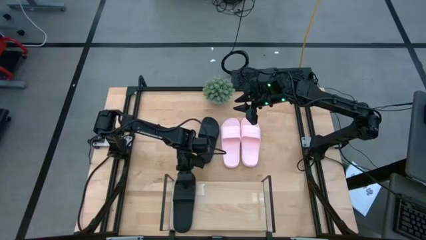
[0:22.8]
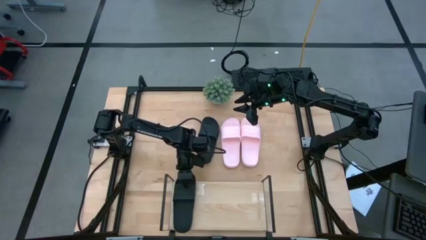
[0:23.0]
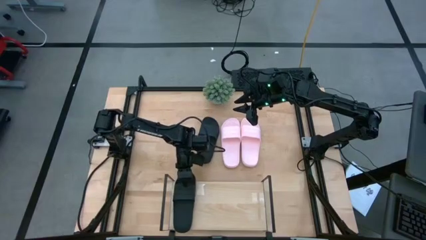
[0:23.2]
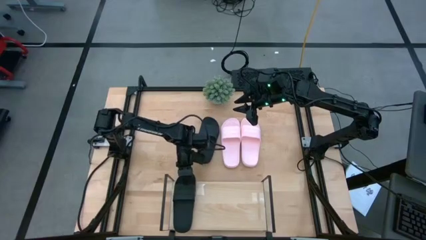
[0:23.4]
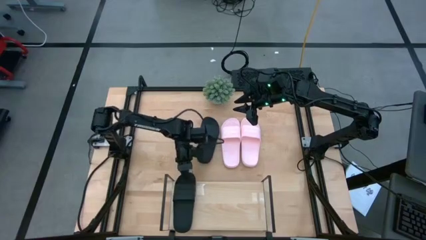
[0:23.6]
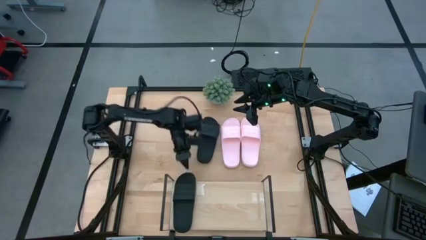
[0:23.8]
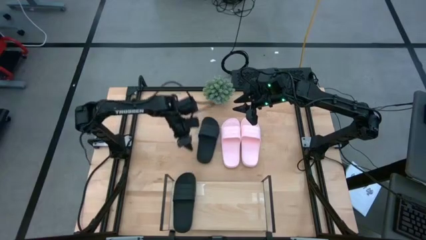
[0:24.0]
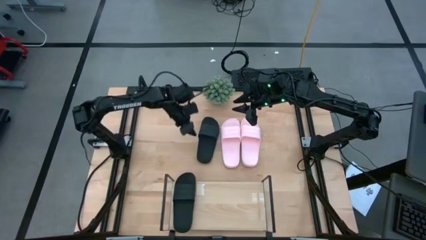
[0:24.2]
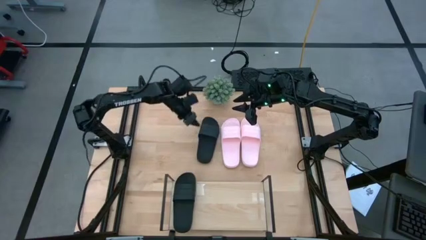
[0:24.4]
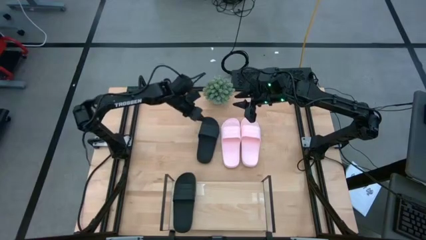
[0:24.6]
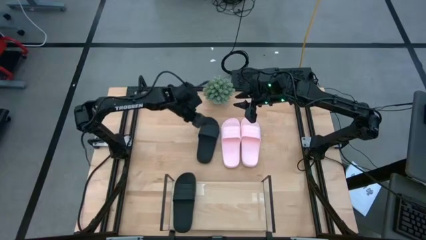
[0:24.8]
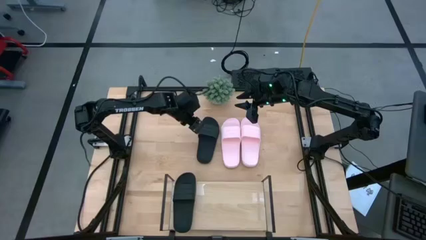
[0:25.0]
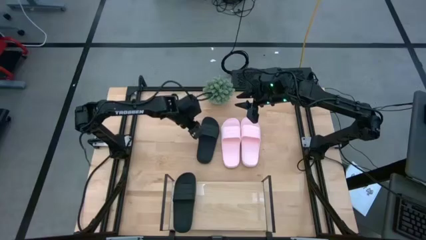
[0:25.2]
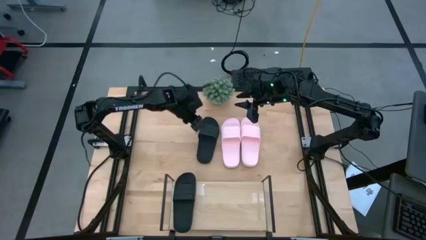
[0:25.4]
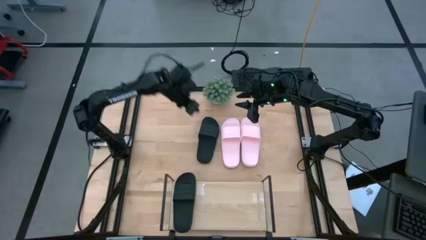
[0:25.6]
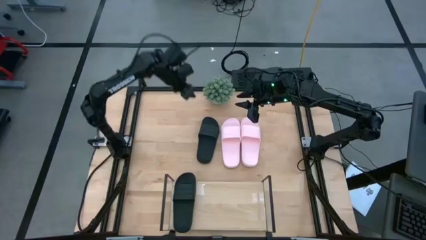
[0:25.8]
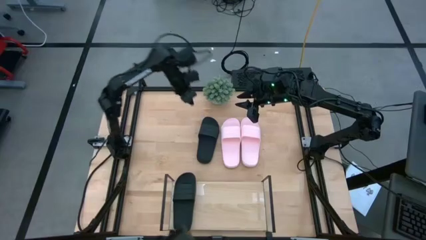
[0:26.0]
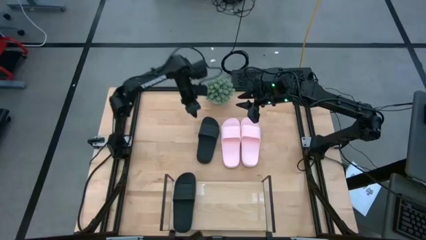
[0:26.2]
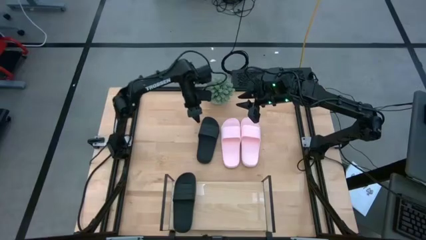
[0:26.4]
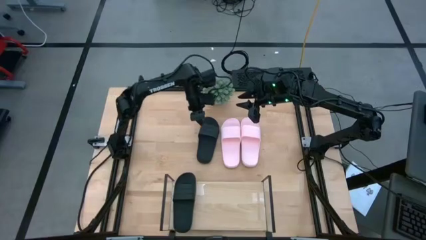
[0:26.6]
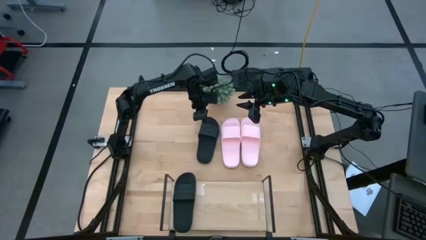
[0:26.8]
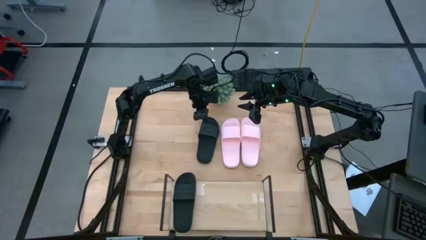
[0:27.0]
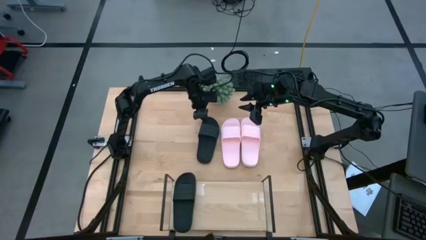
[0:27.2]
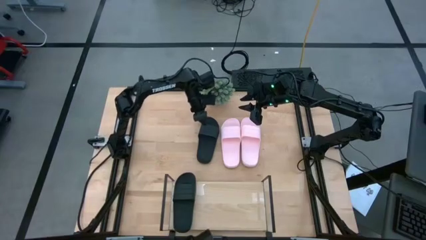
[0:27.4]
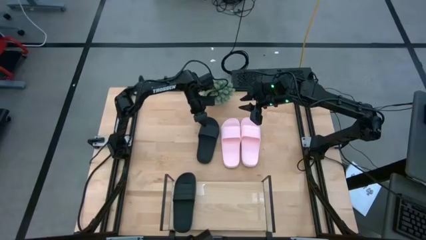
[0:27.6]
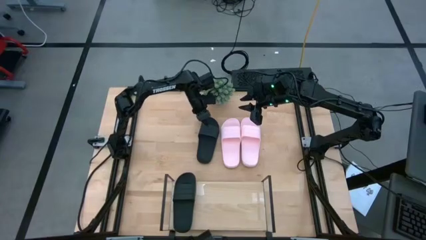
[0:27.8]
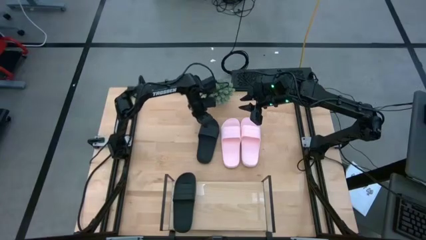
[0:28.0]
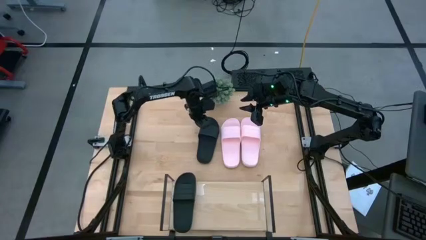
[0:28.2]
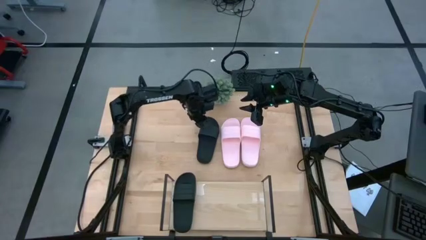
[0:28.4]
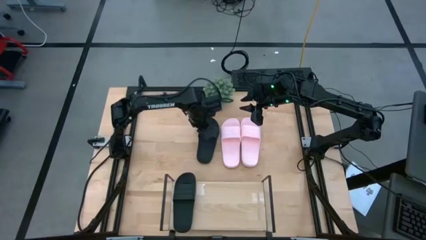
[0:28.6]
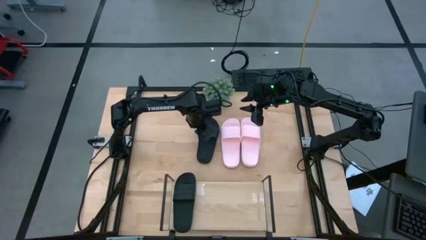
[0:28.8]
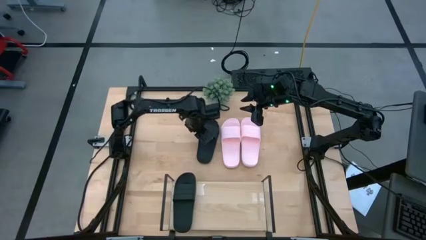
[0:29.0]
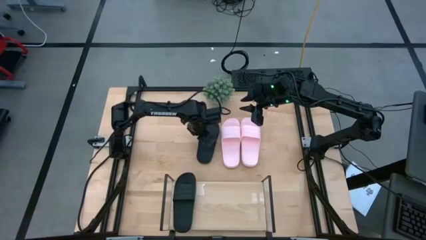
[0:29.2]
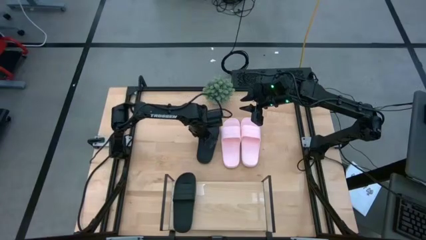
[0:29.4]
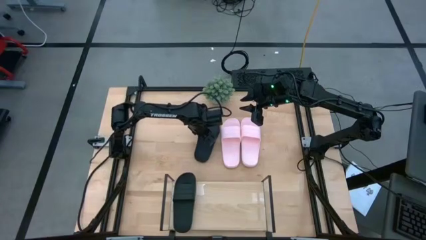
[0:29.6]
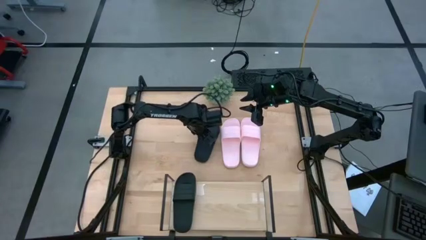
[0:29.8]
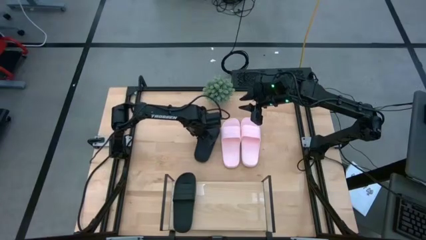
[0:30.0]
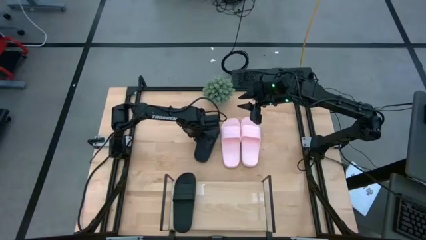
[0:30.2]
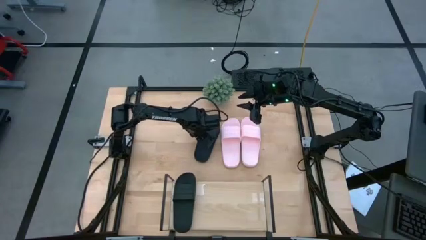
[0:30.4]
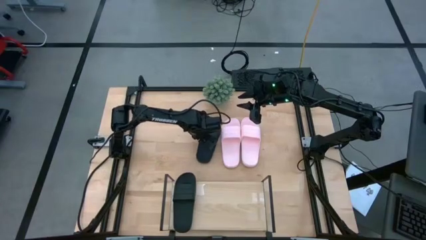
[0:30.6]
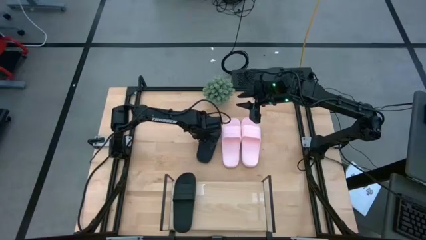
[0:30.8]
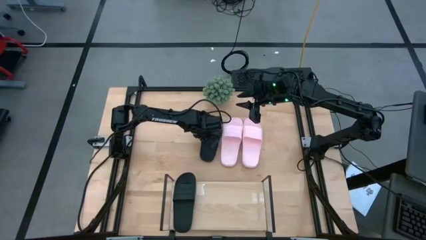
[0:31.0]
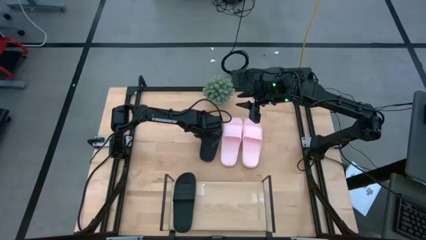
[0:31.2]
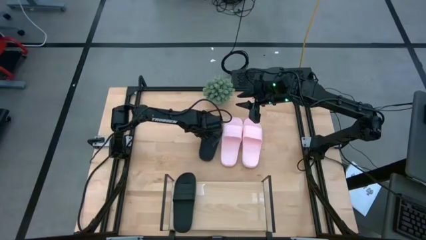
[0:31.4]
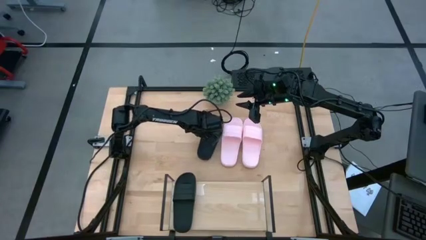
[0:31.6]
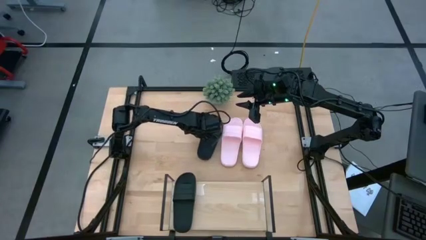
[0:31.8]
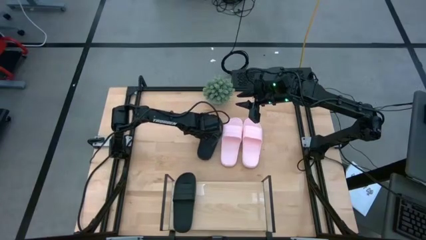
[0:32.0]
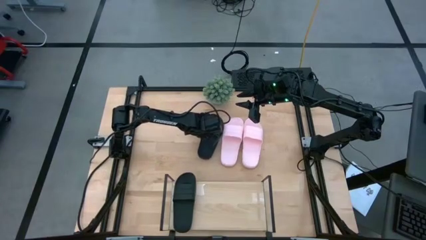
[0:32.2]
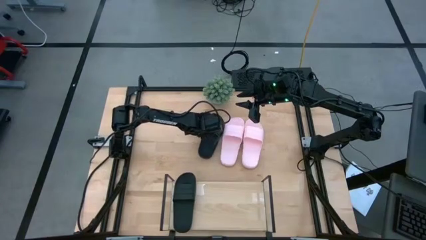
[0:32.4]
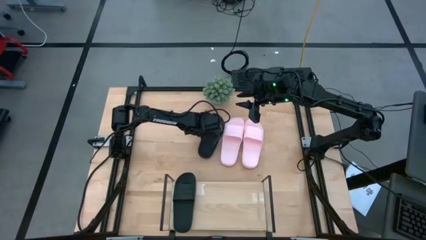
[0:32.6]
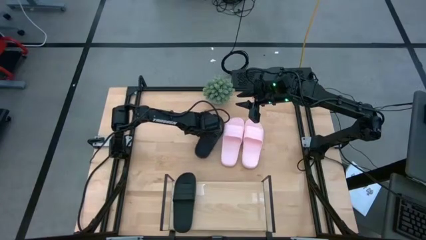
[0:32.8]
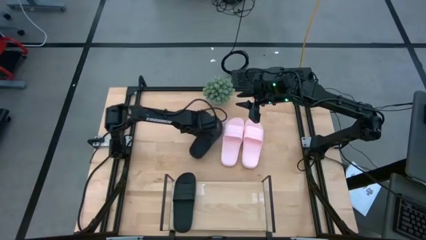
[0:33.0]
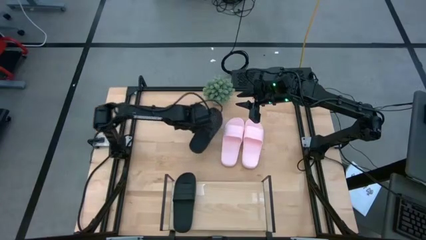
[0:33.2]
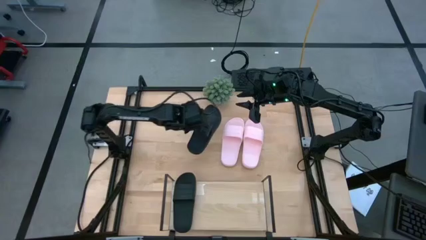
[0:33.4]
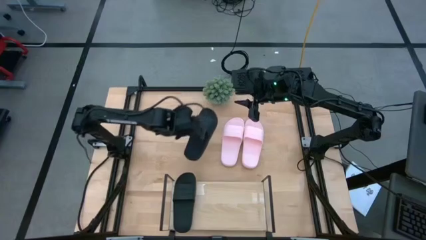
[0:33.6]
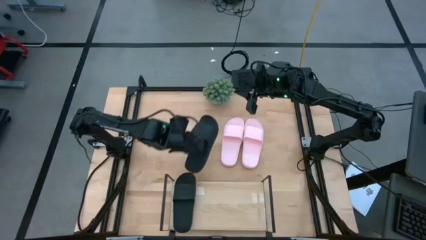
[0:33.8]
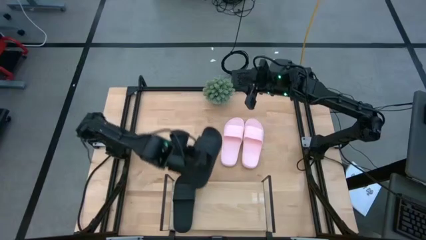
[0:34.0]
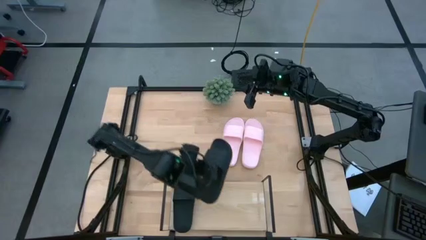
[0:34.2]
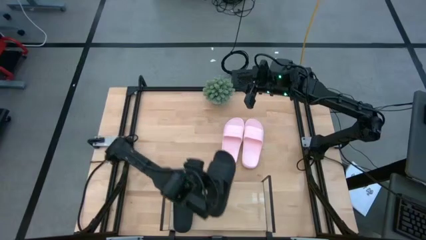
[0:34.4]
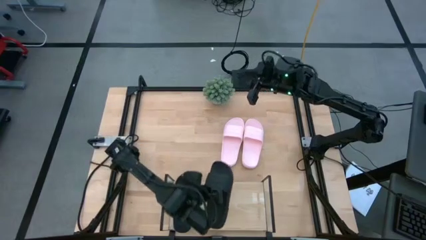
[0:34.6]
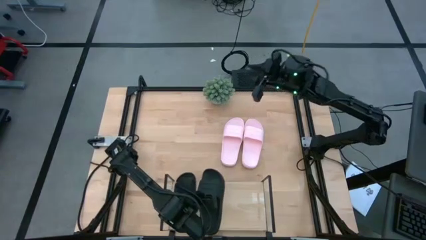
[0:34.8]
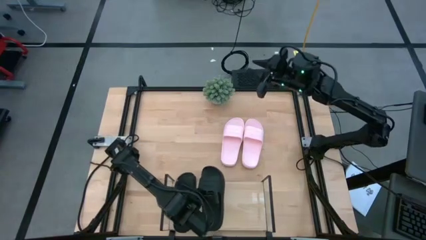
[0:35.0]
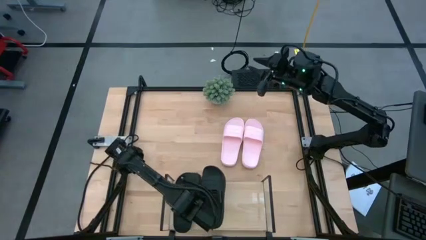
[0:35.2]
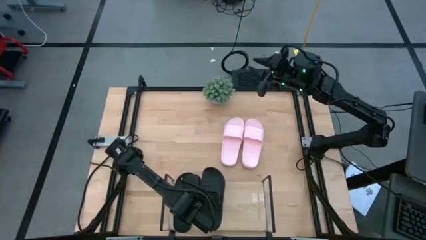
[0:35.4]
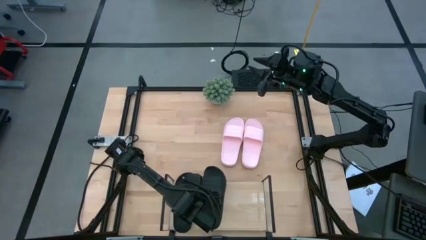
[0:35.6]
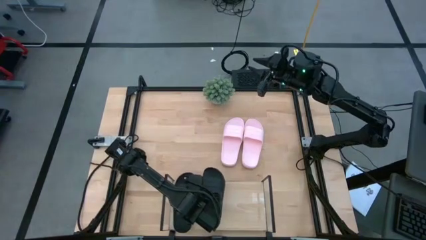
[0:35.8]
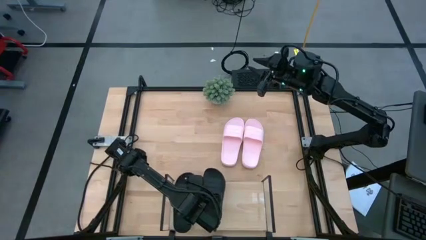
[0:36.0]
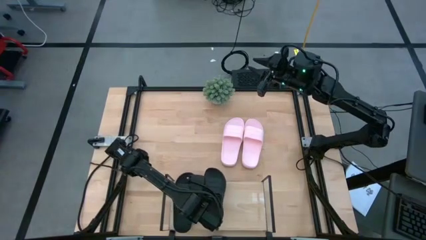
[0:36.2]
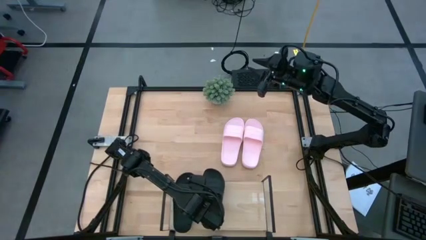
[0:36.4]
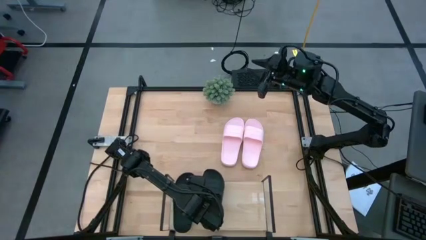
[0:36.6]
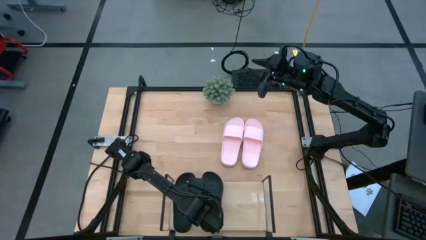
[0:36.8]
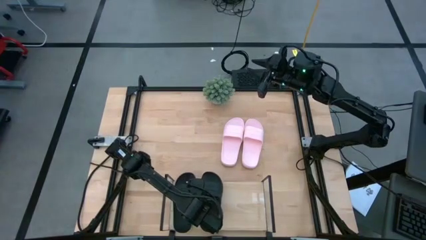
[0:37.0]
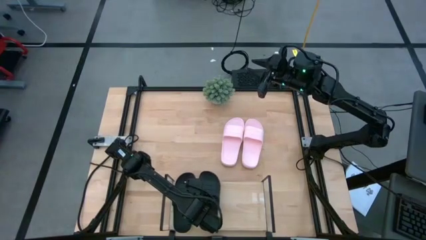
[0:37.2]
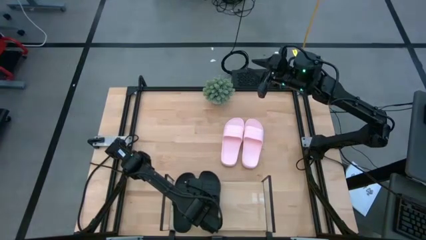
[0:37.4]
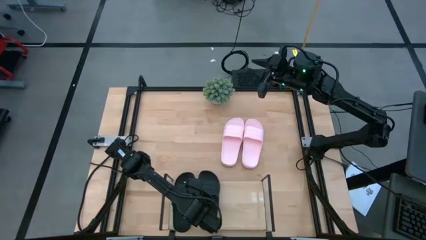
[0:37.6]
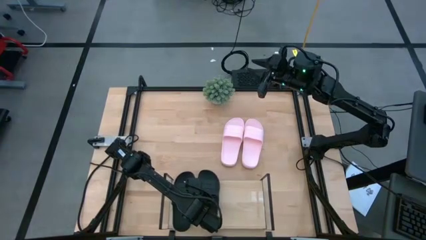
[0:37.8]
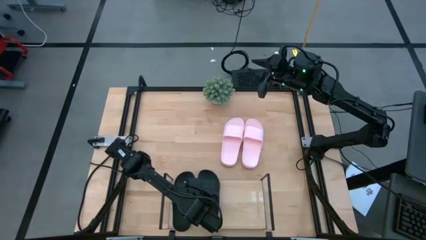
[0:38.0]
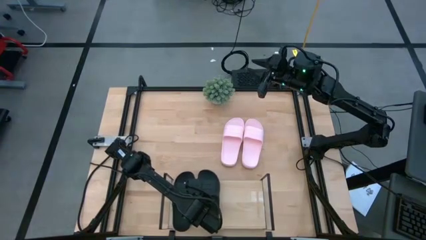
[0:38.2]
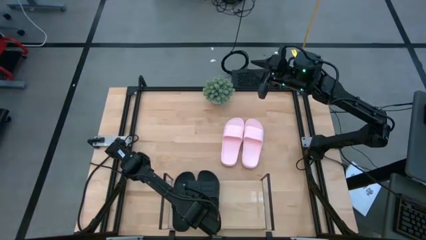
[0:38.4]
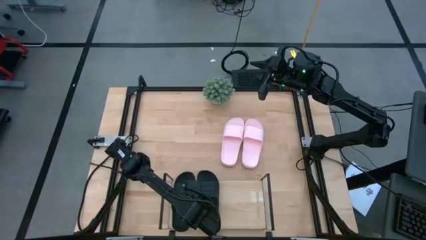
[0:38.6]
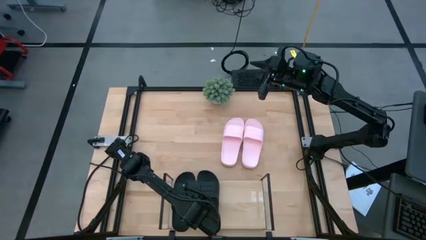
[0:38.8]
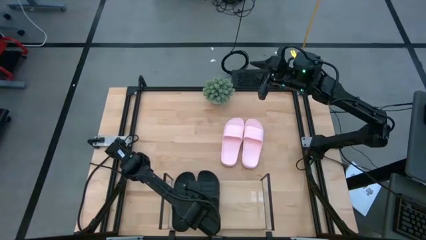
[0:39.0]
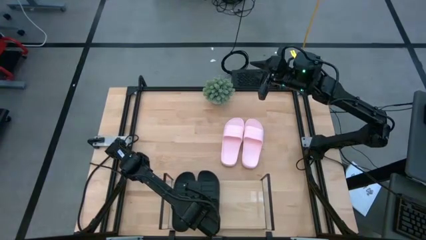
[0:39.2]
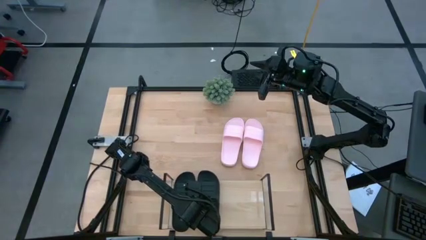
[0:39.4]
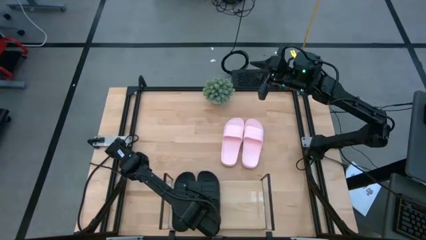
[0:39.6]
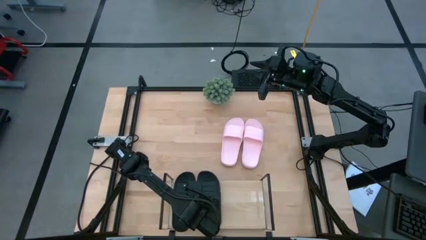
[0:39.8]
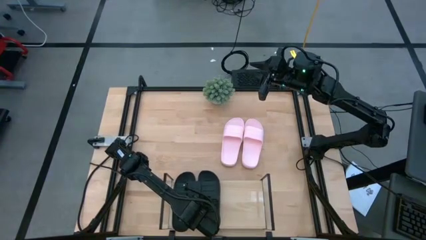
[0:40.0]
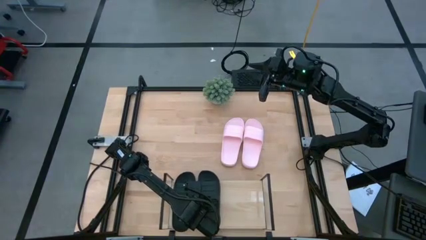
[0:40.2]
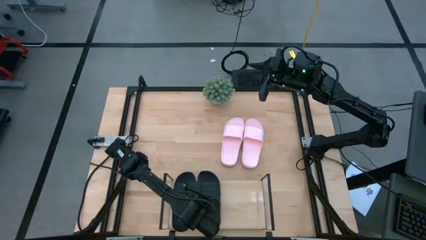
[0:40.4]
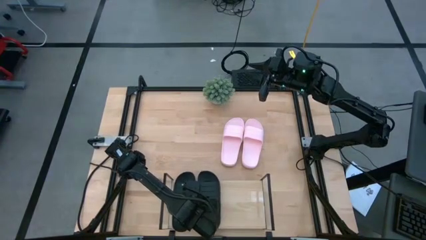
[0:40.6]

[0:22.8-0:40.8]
Task: Pick and place slides into the shelf
Put the black slide on the shelf
